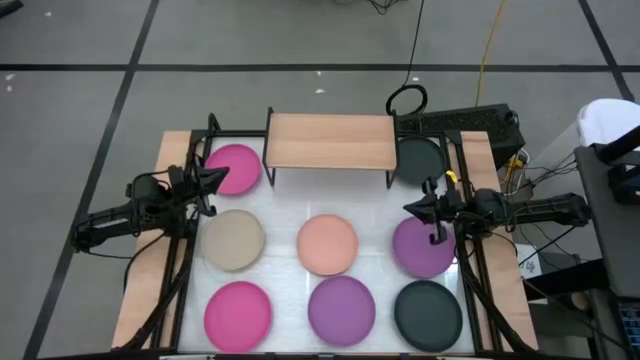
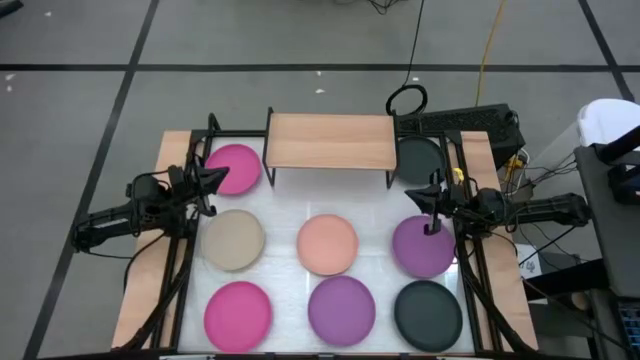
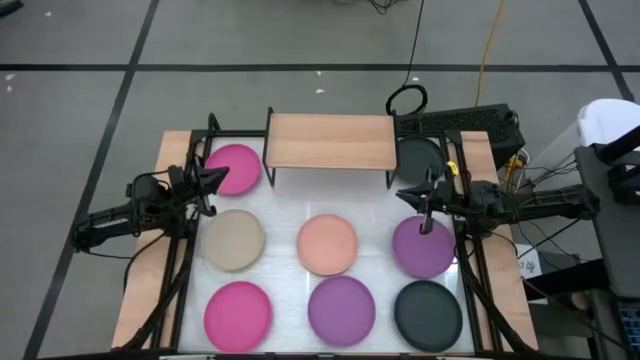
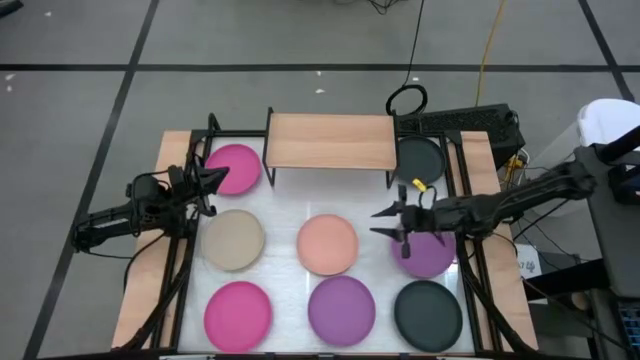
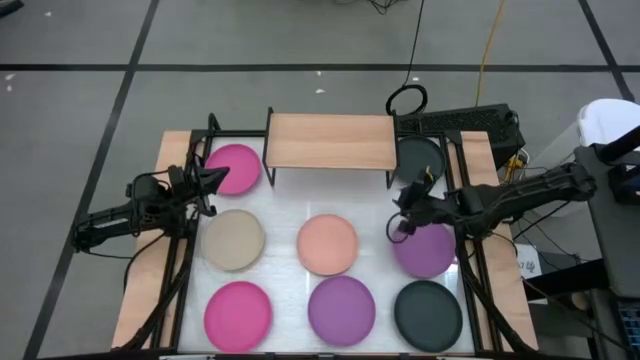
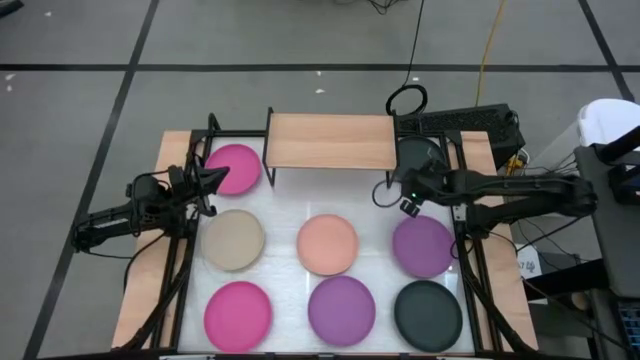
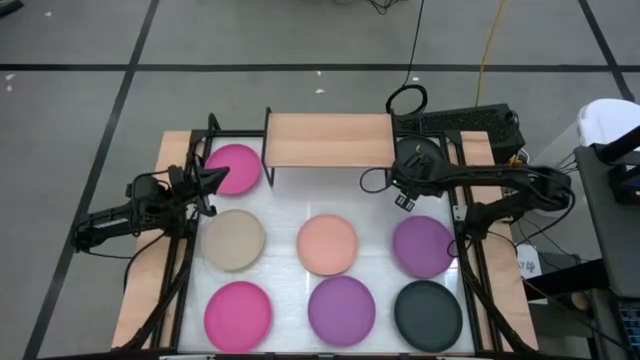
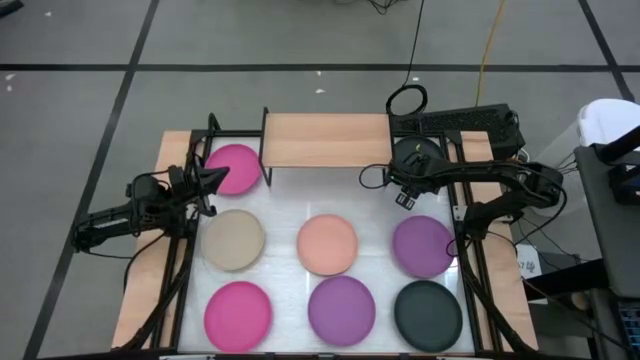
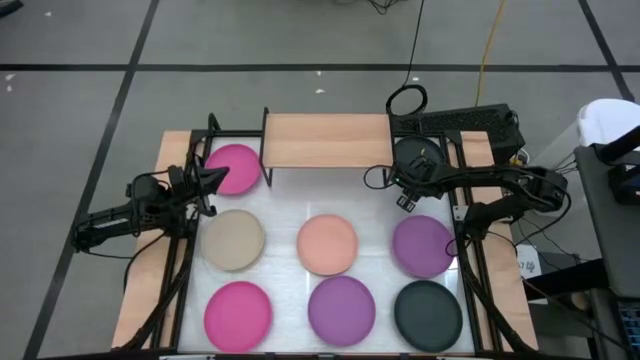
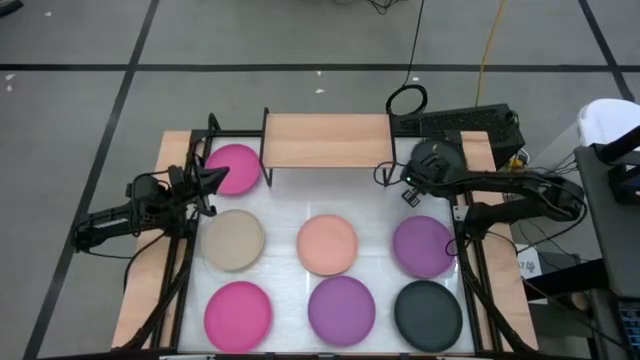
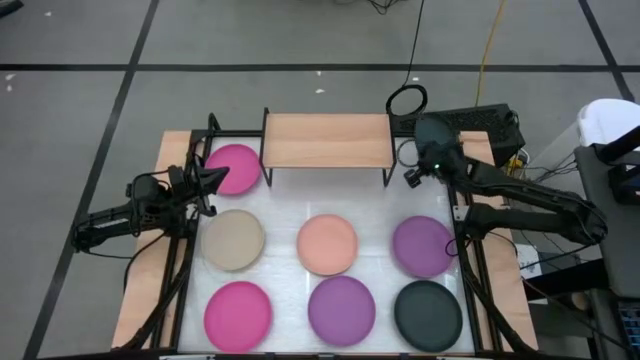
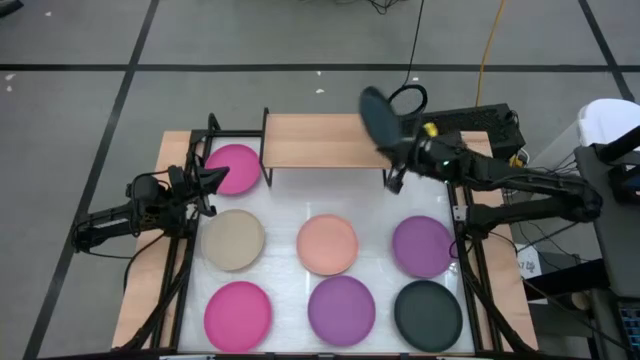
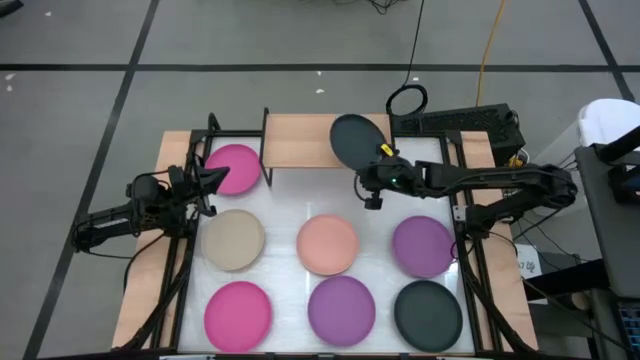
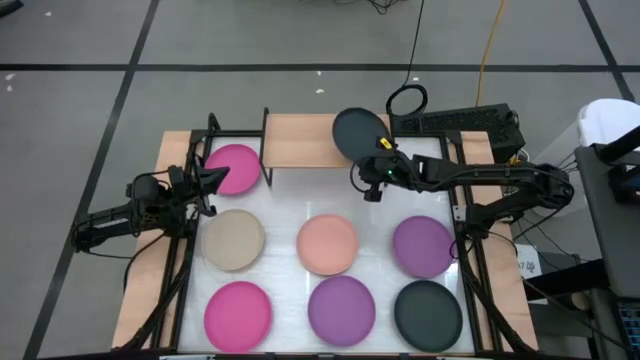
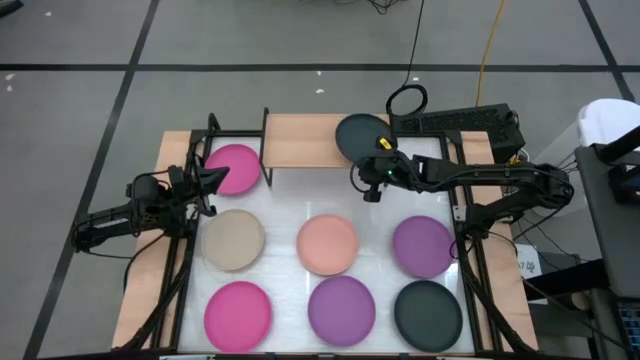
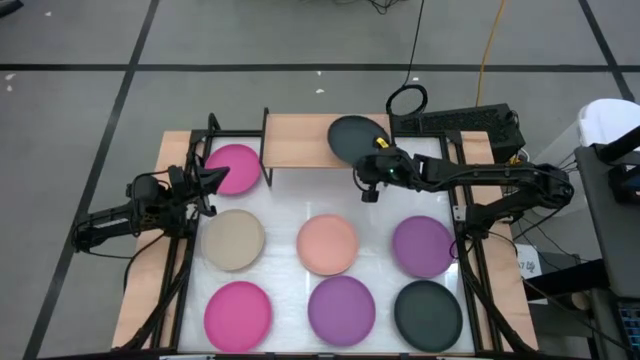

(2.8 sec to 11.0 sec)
Task: Place and stack plates onto a shelf
Put the top black plate on the shelf

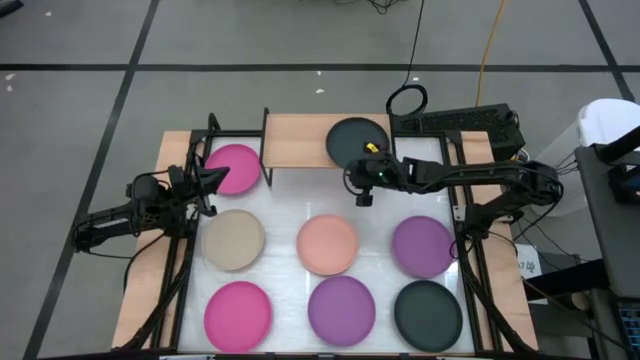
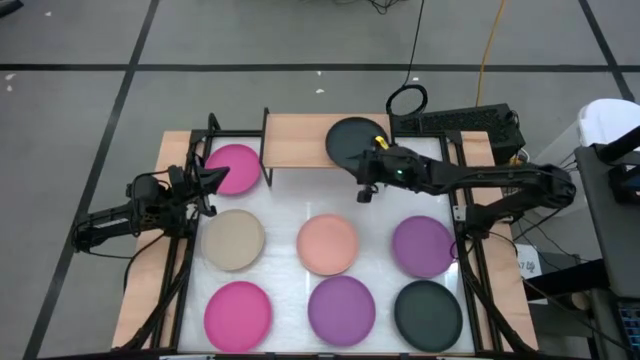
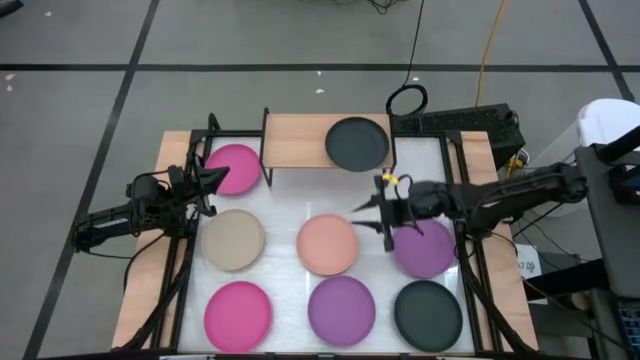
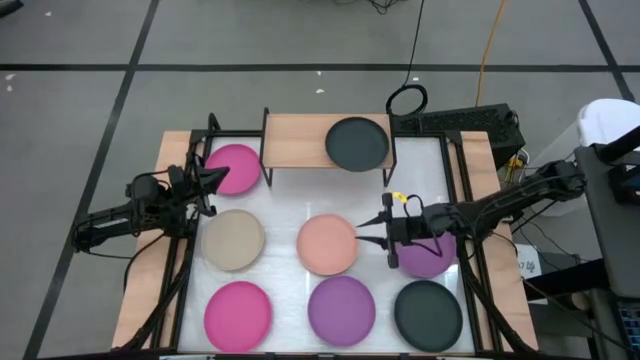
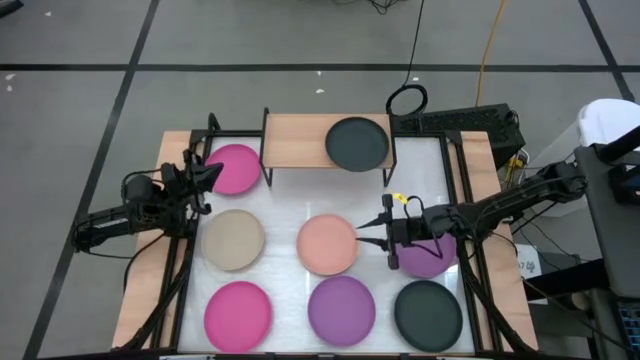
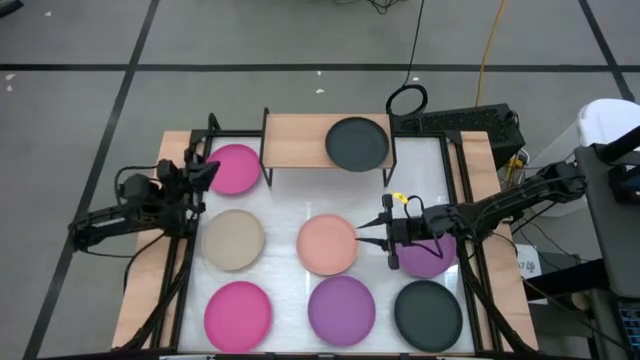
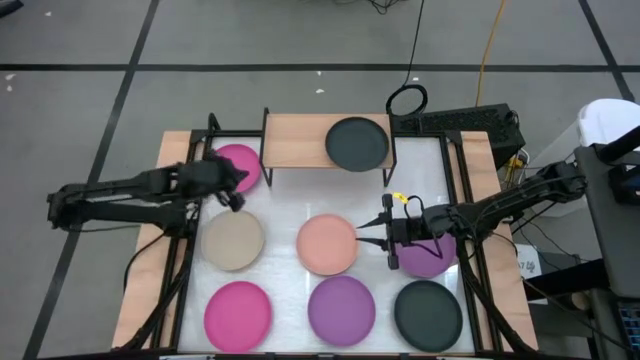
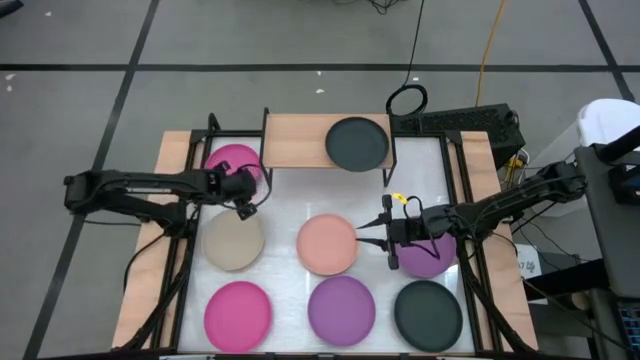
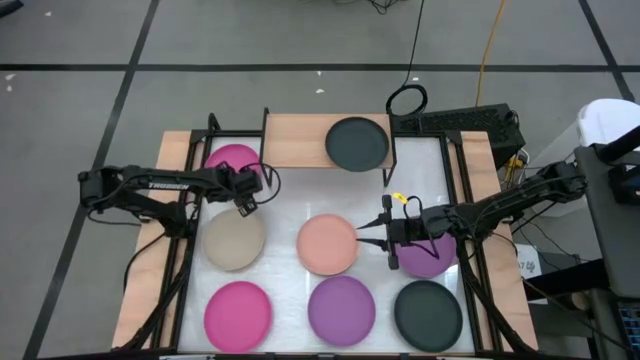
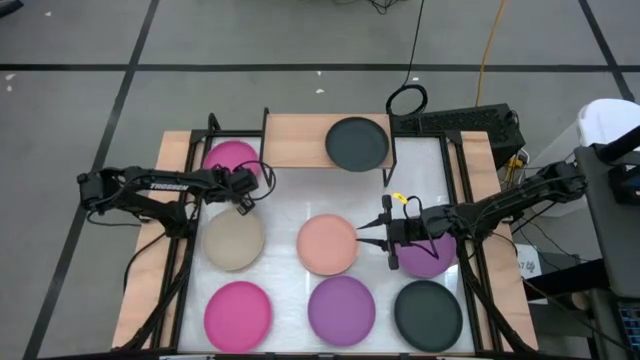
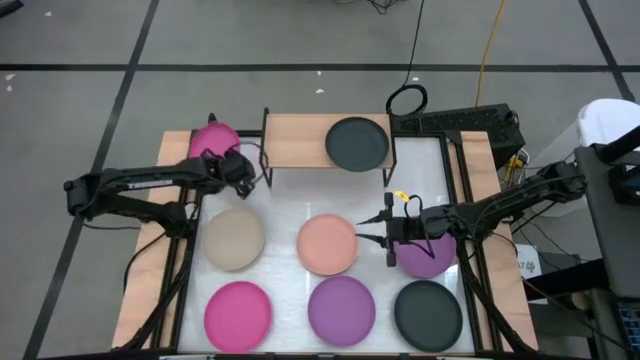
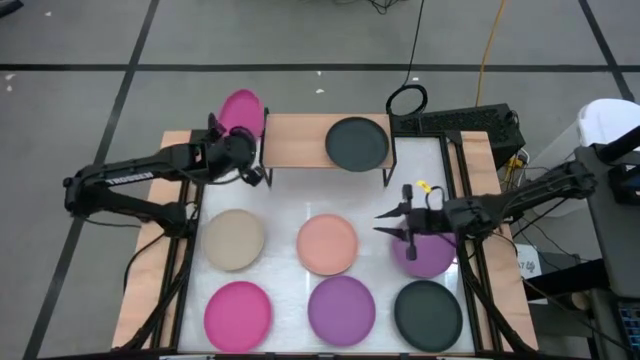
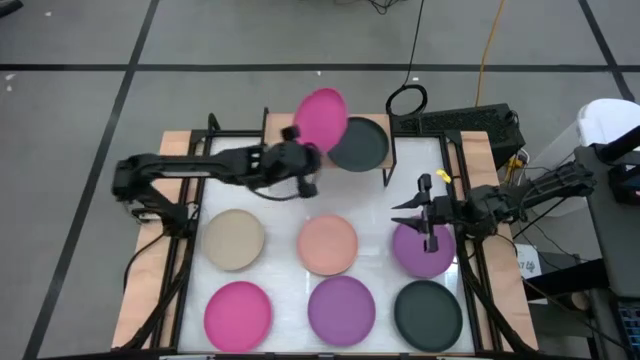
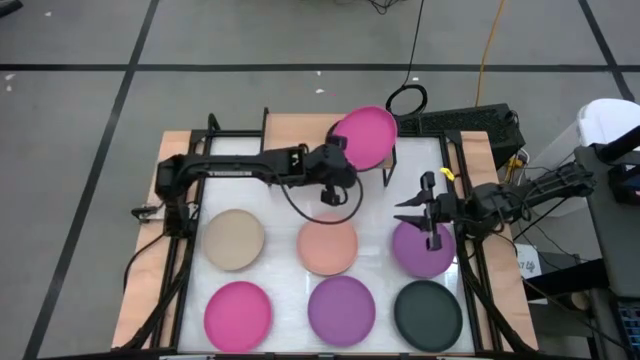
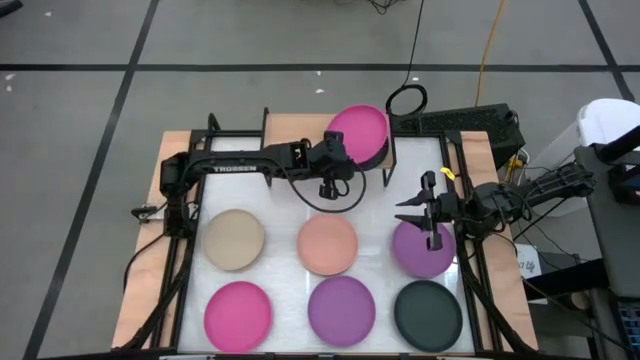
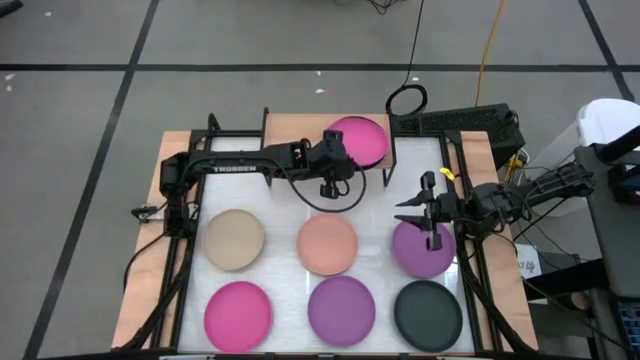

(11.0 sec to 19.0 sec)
Stack the top pink plate on top of the black plate on the shelf

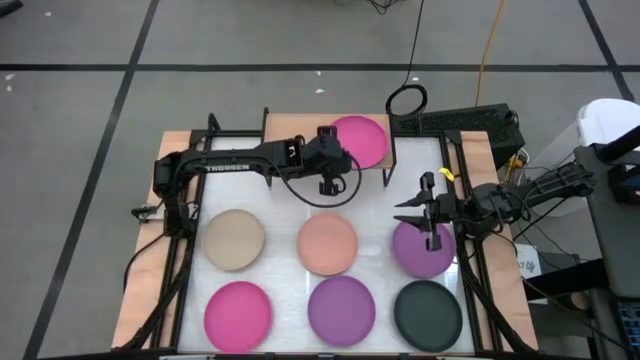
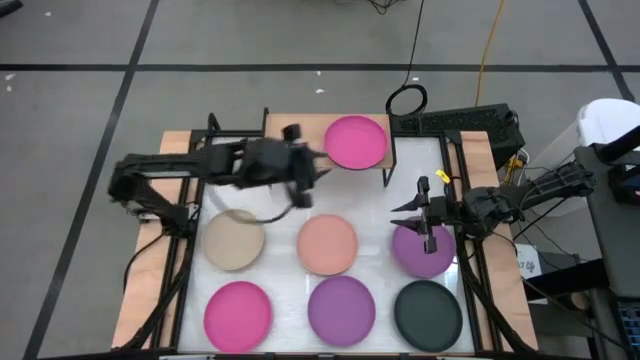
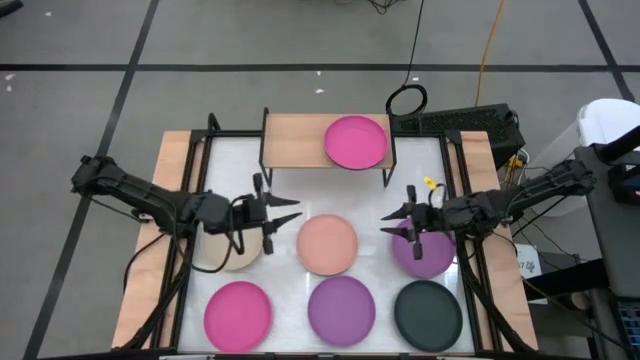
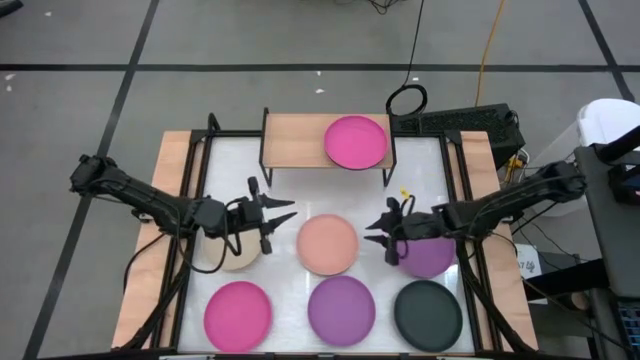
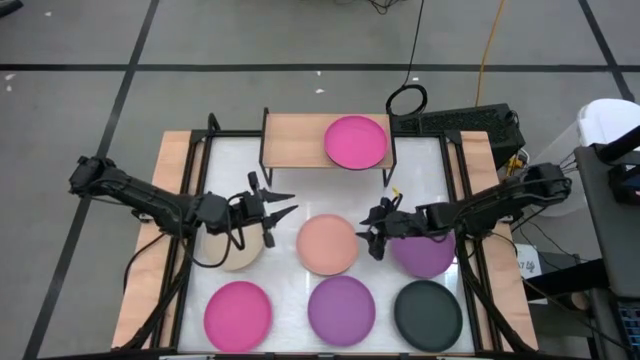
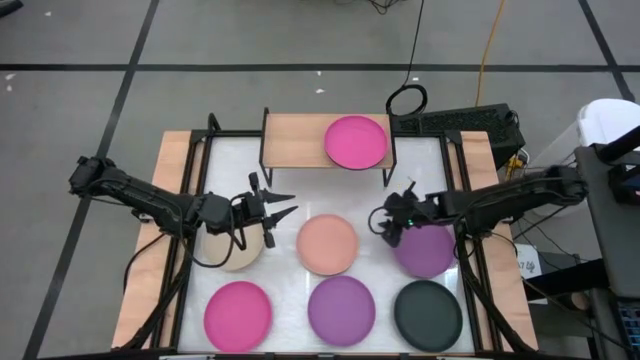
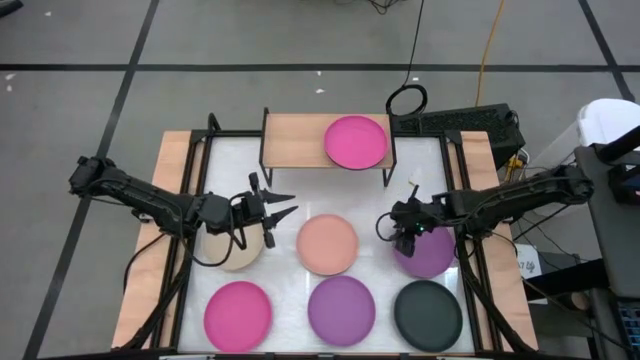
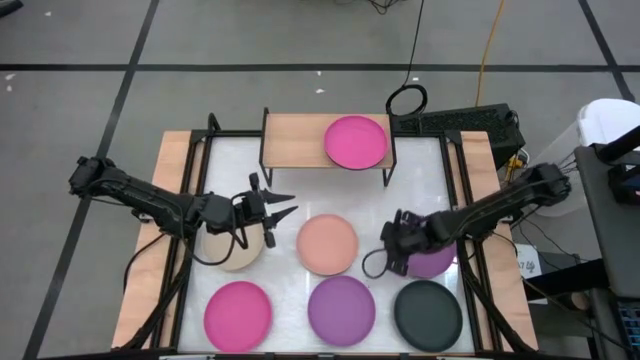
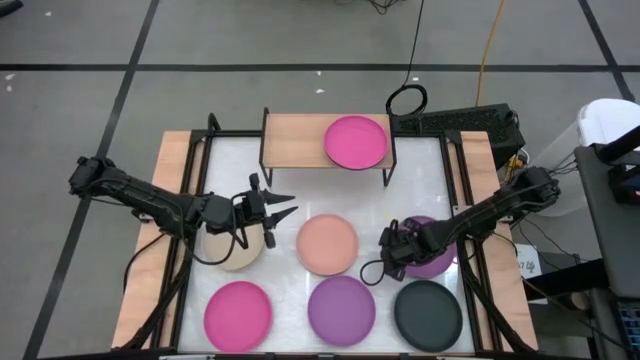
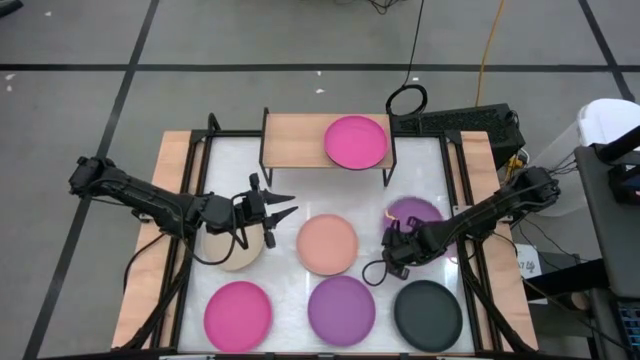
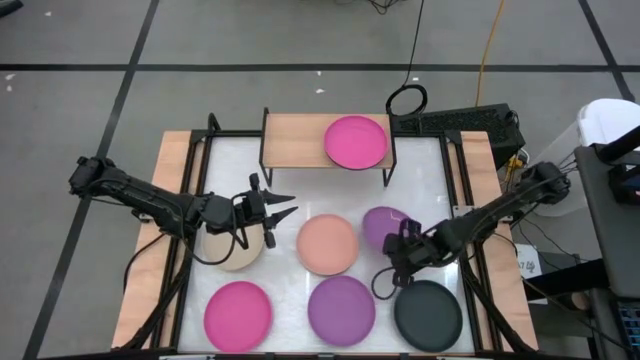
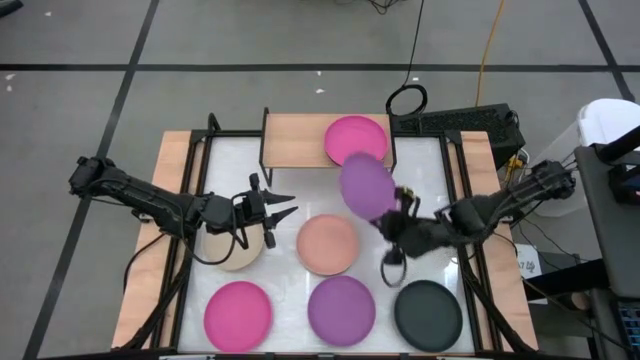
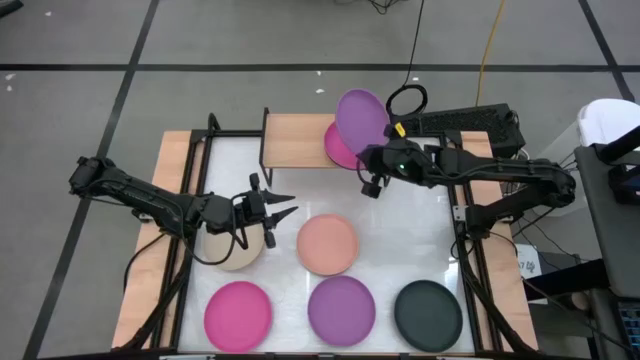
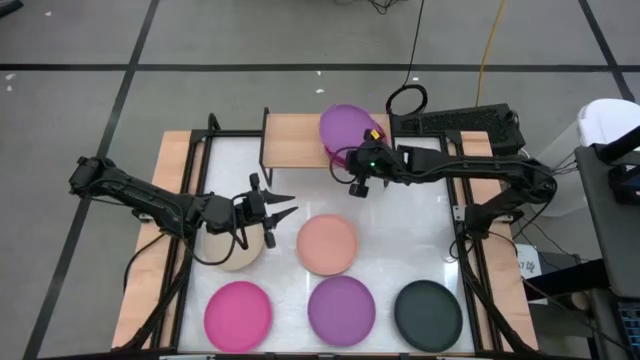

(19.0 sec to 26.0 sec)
Stack the right violet plate on top of the pink plate on the shelf
